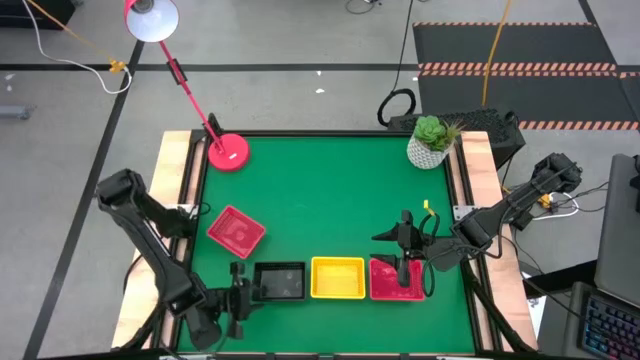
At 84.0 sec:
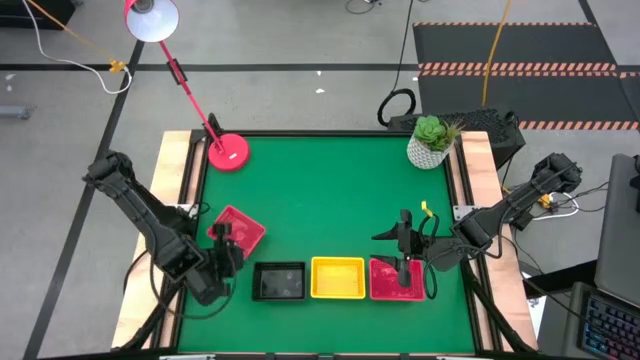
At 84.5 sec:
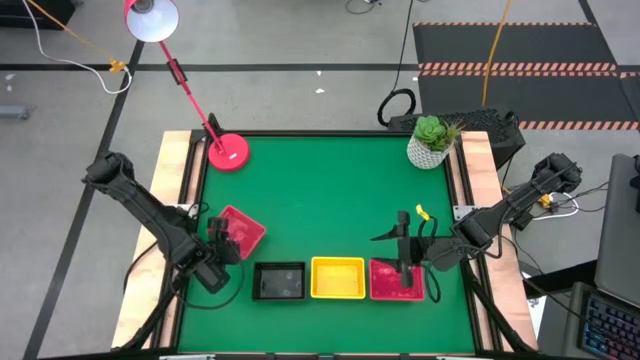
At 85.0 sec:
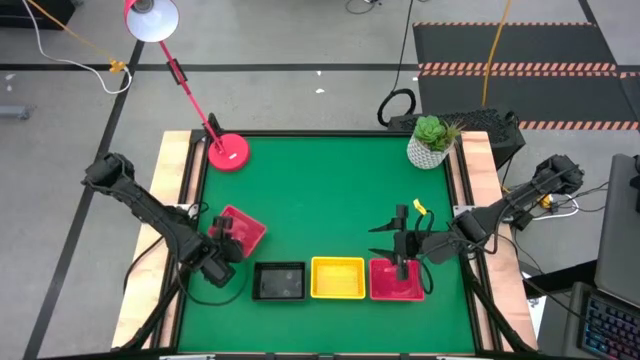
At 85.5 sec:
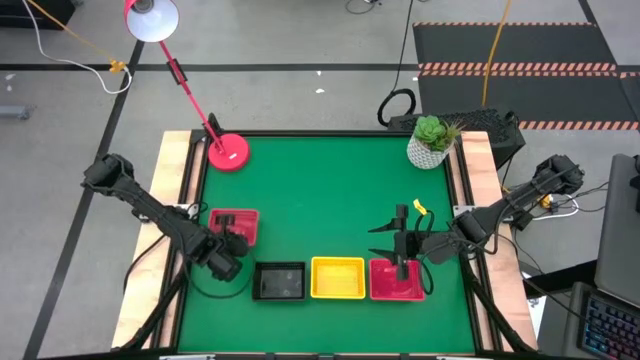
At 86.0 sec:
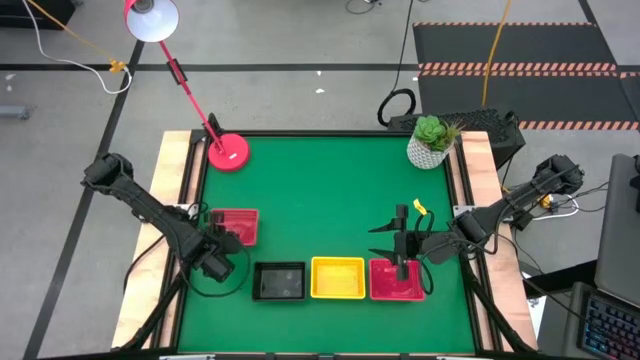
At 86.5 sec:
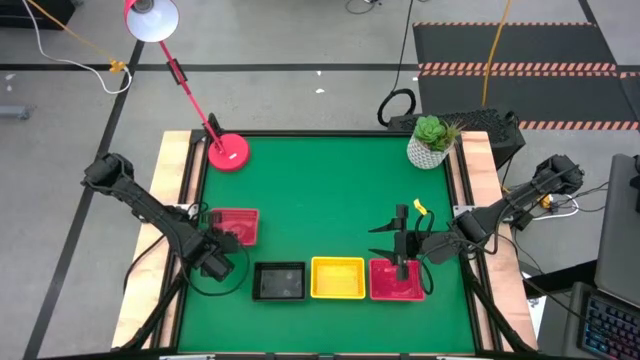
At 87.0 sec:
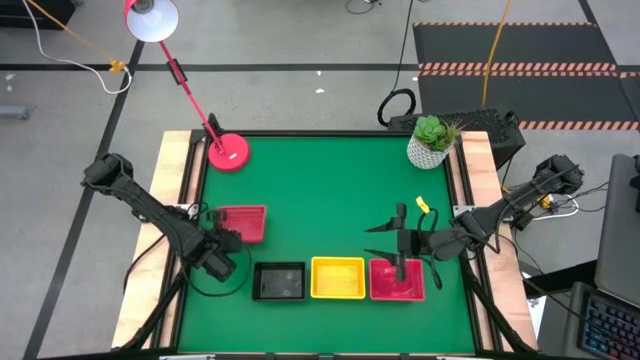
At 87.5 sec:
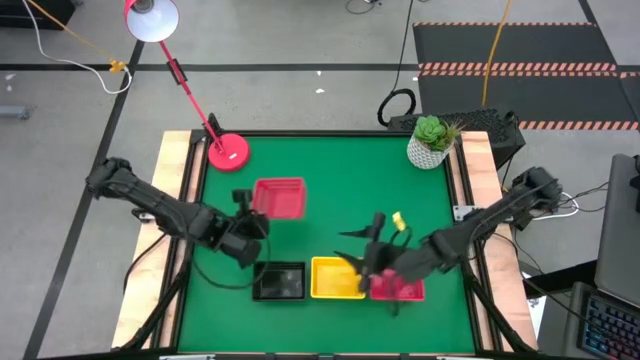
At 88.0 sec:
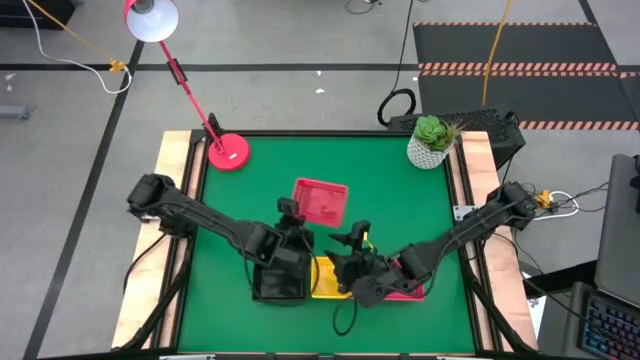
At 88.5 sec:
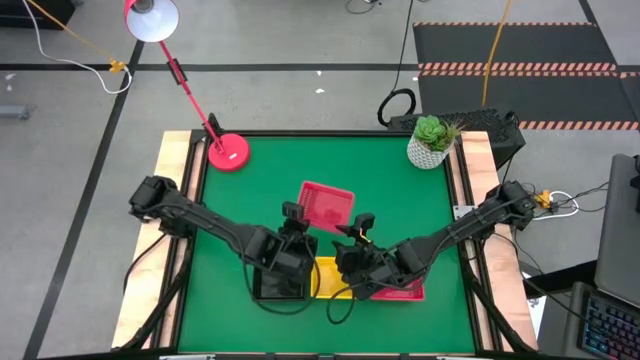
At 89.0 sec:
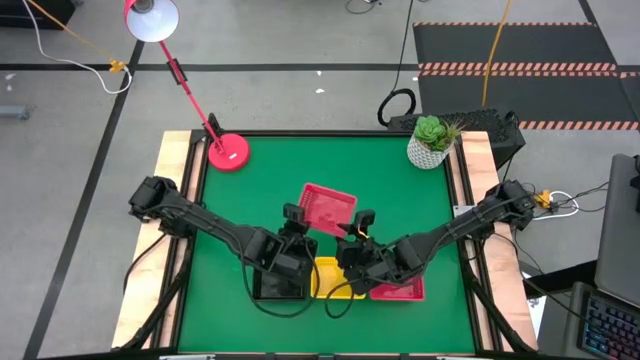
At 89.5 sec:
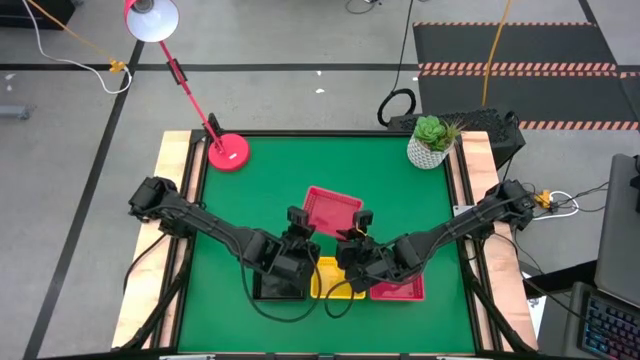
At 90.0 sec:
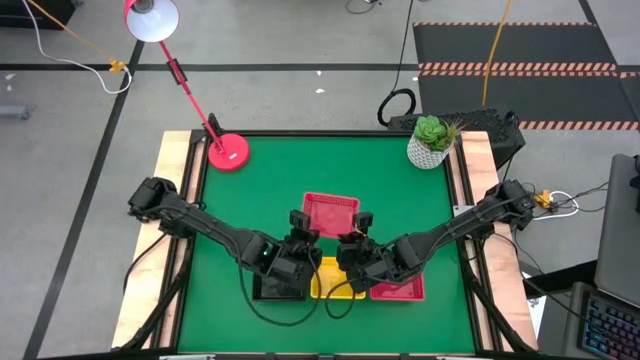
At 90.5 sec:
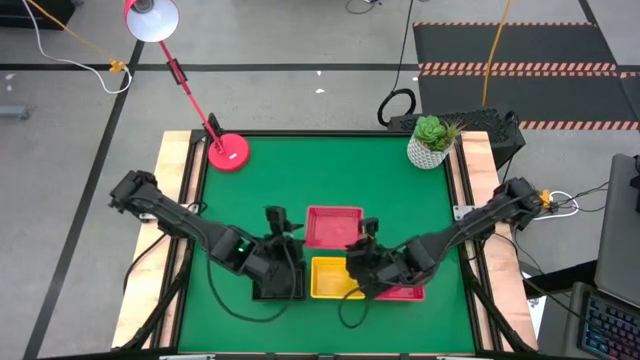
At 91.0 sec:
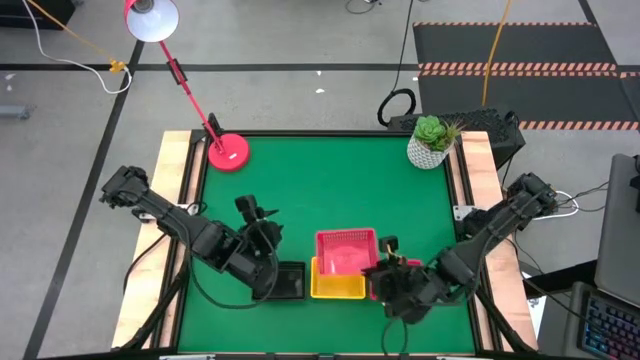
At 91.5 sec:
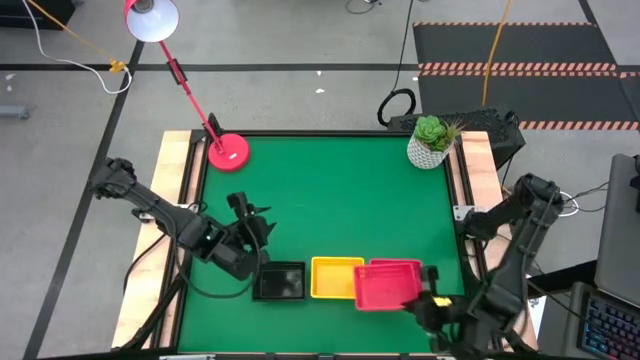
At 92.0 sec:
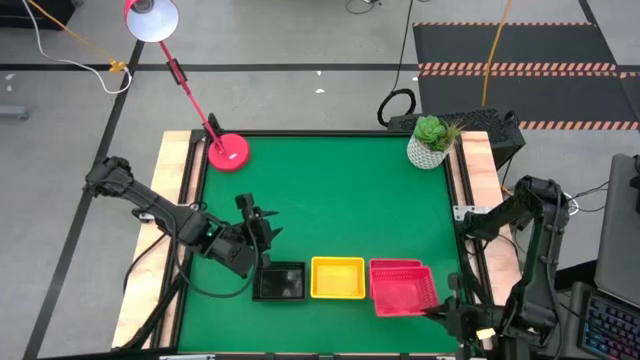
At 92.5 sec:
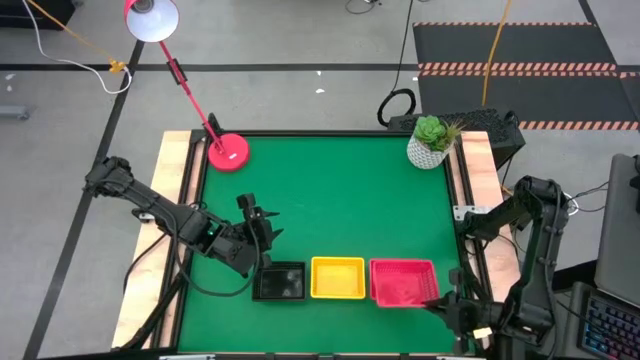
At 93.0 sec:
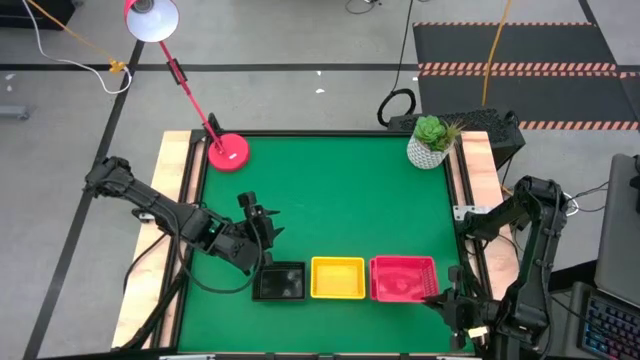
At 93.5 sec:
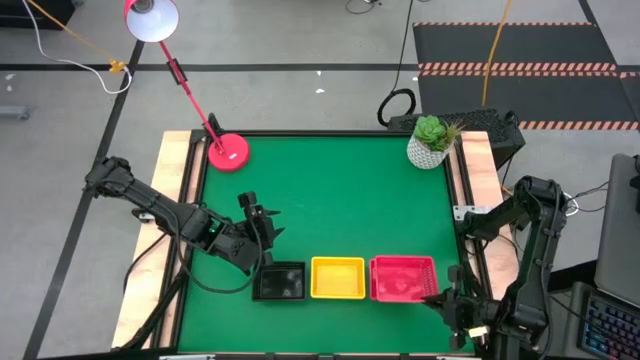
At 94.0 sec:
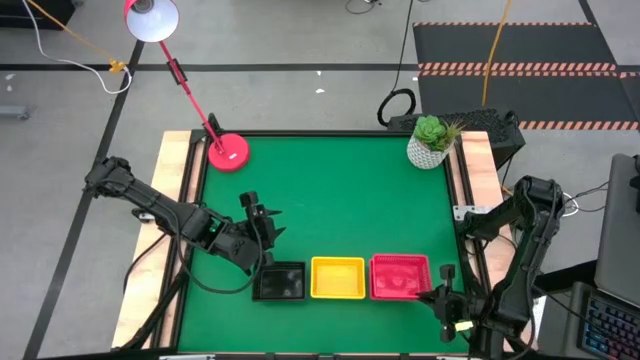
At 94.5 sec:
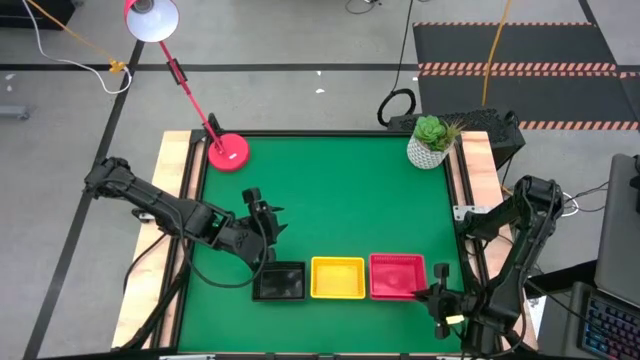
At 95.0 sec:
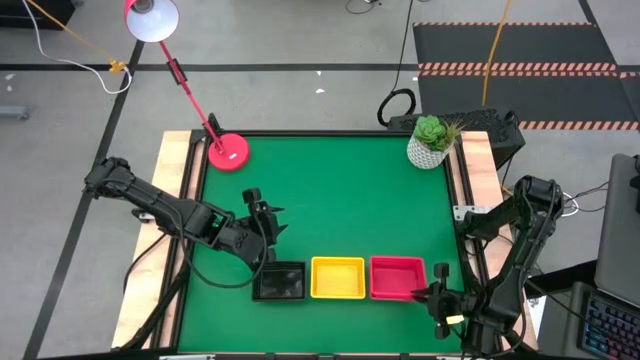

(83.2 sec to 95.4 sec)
Stack the top red bin on top of the bottom red bin

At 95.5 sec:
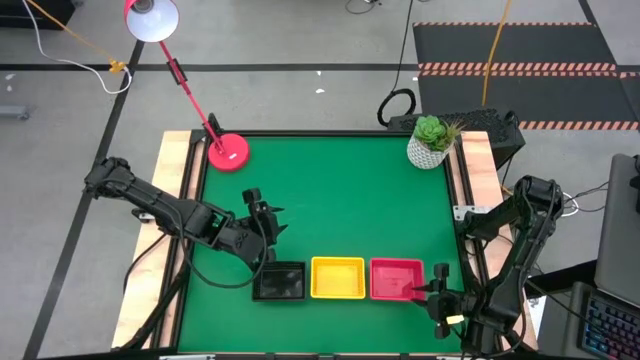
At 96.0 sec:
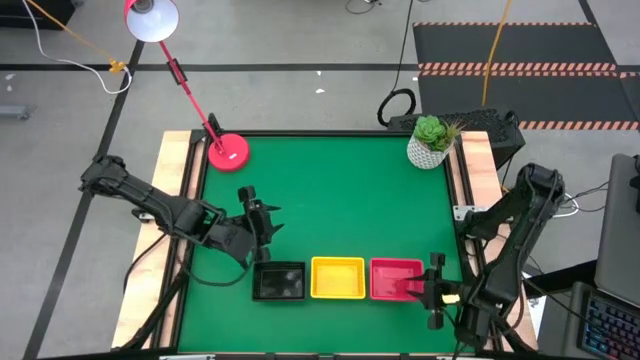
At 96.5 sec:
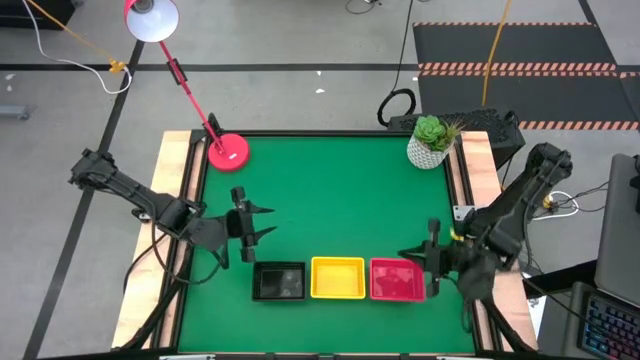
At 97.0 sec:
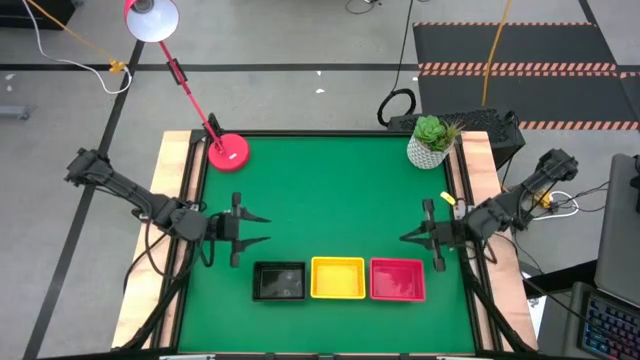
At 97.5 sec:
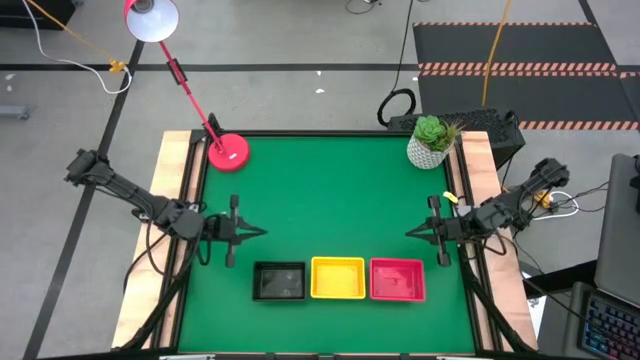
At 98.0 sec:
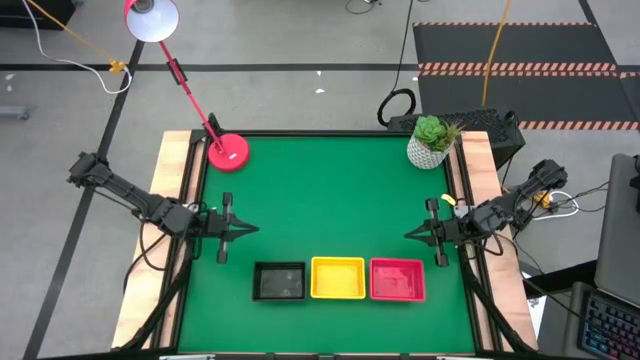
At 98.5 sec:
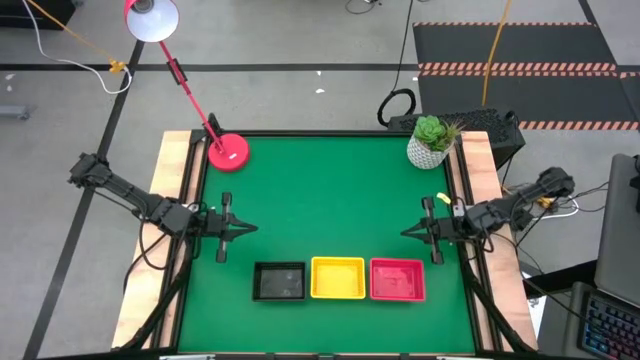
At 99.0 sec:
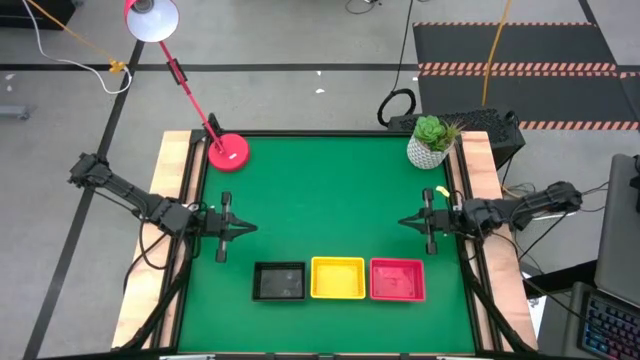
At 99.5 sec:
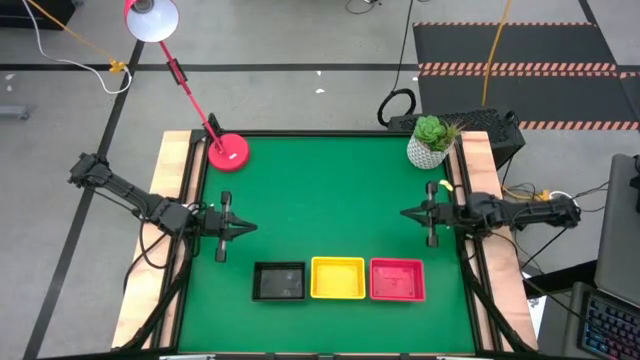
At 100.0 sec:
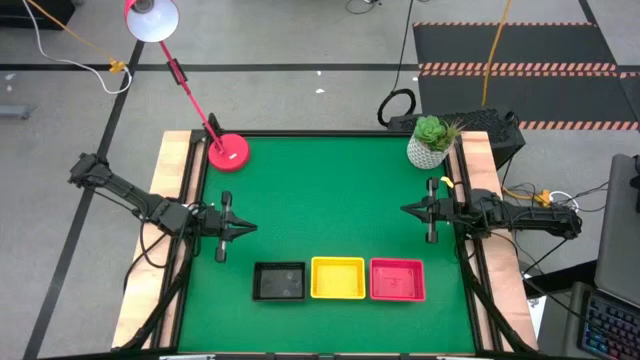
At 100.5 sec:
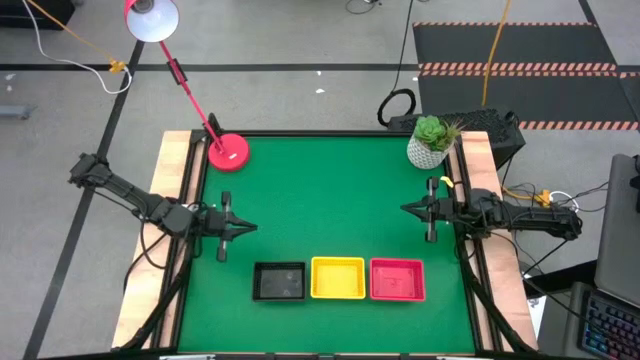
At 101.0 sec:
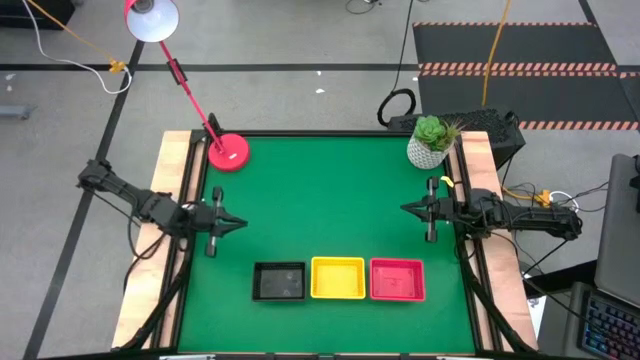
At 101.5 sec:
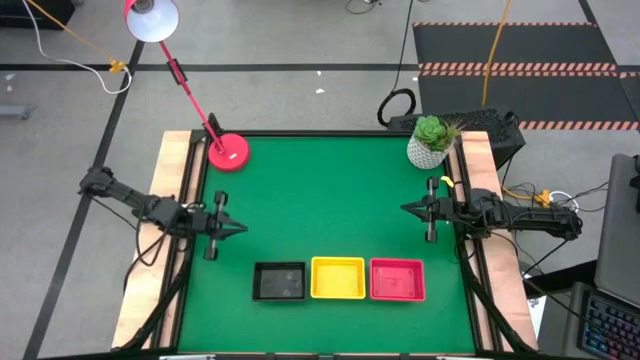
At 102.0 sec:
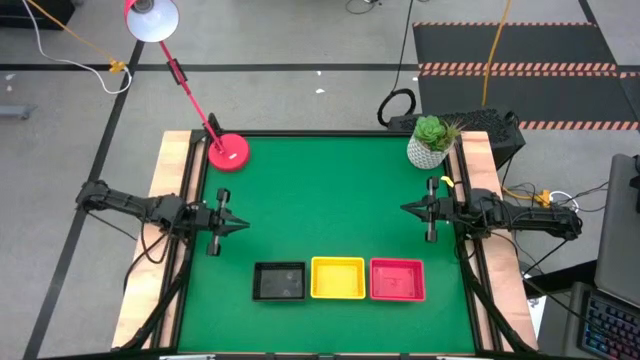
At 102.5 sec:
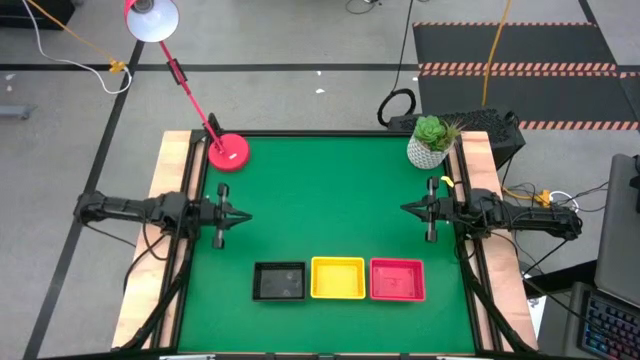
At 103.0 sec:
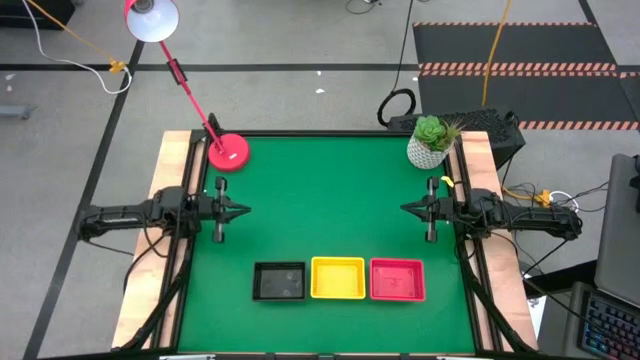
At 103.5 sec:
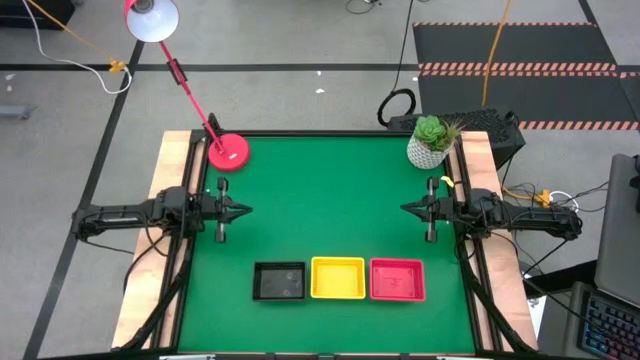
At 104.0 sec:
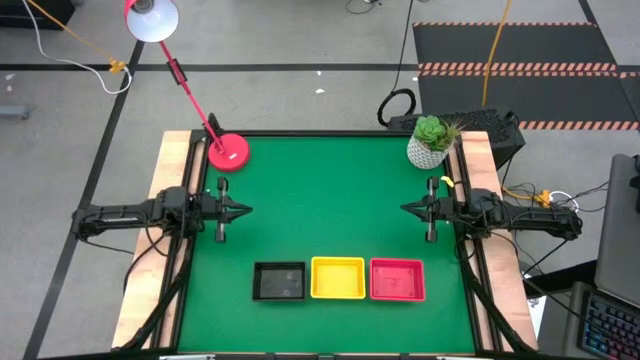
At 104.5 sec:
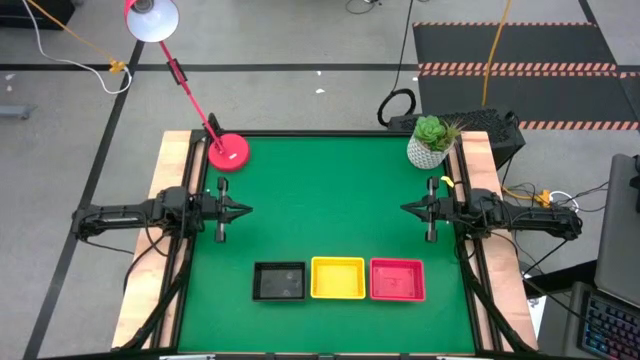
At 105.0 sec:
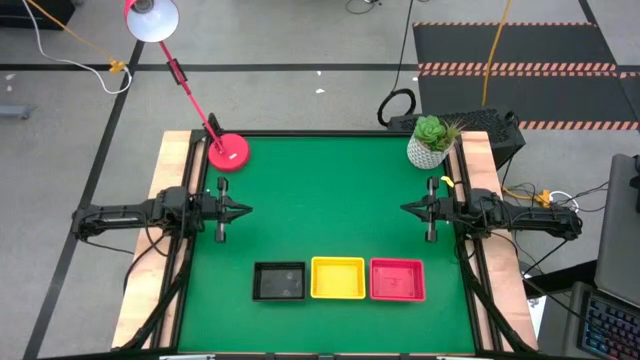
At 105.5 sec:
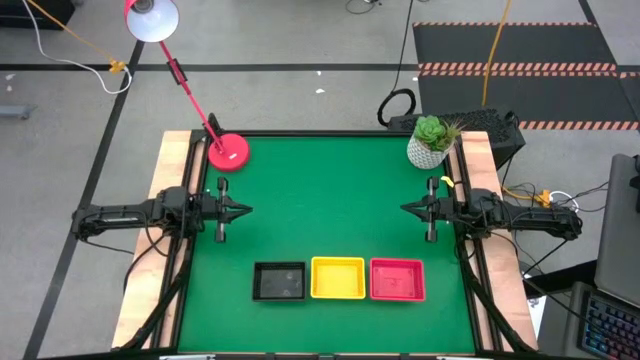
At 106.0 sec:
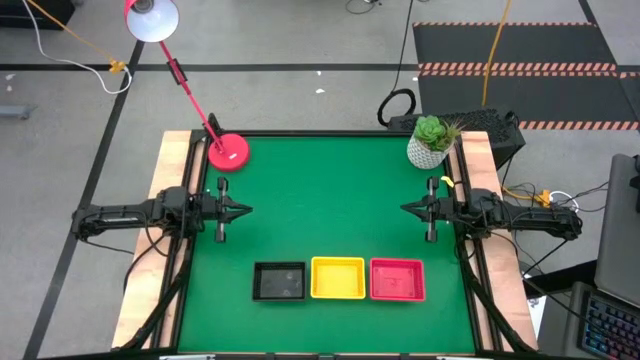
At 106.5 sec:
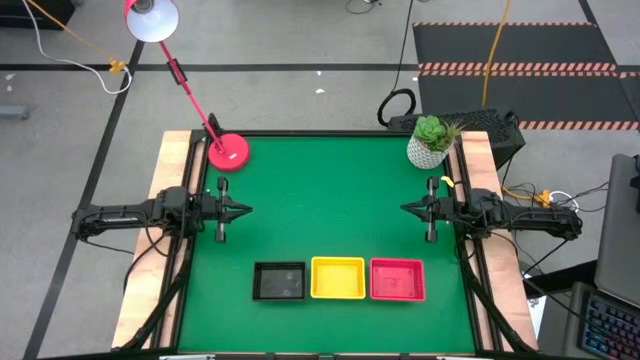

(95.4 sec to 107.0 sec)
Return to Home Position
